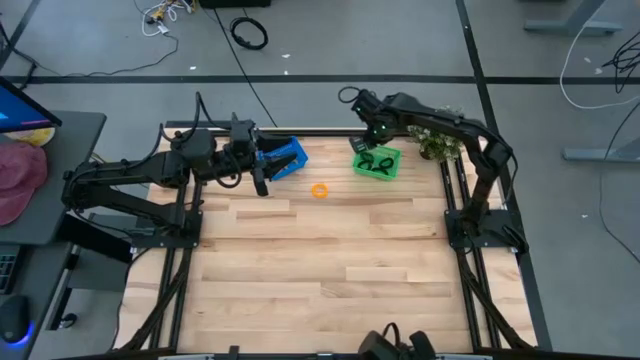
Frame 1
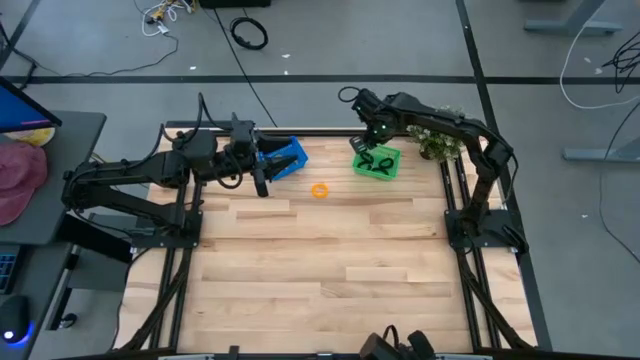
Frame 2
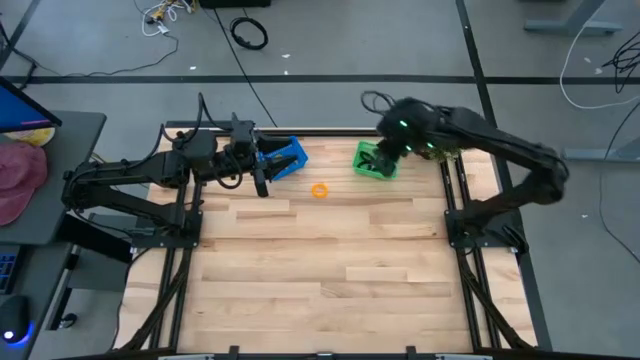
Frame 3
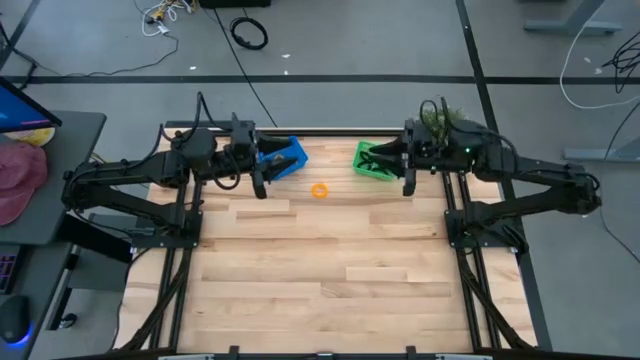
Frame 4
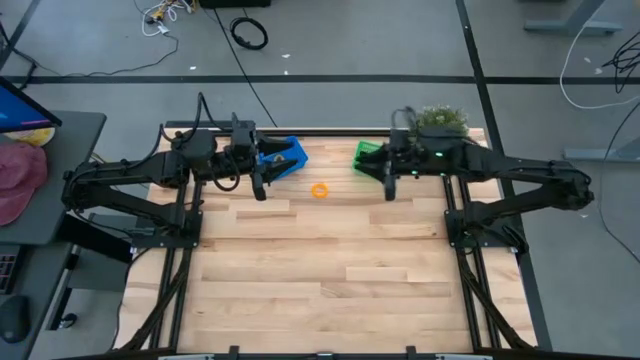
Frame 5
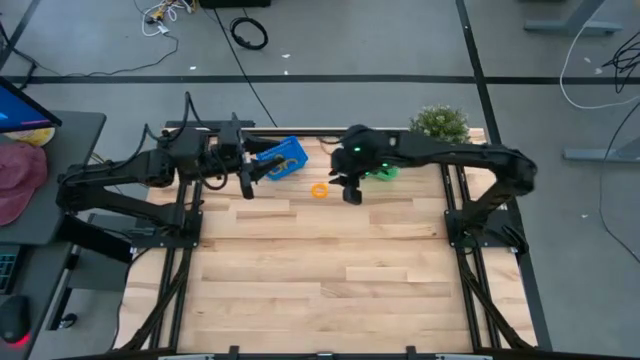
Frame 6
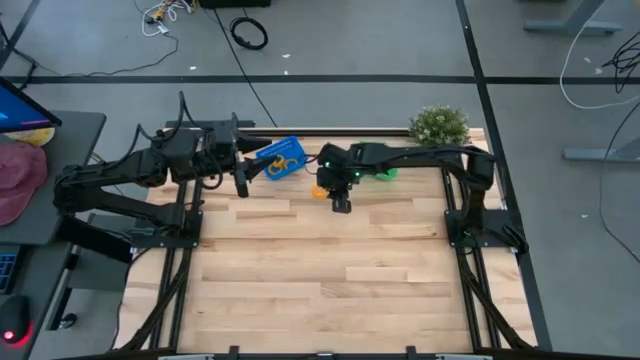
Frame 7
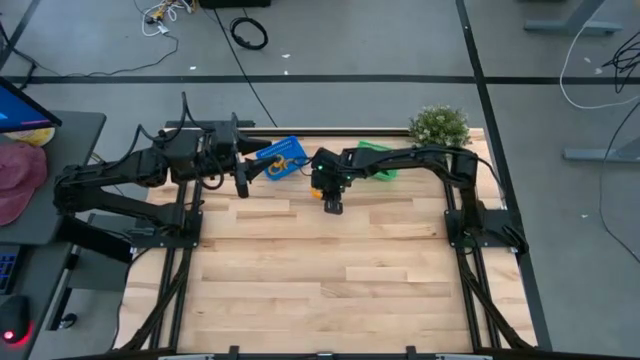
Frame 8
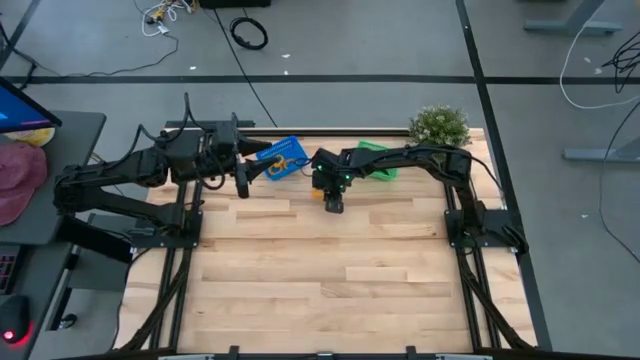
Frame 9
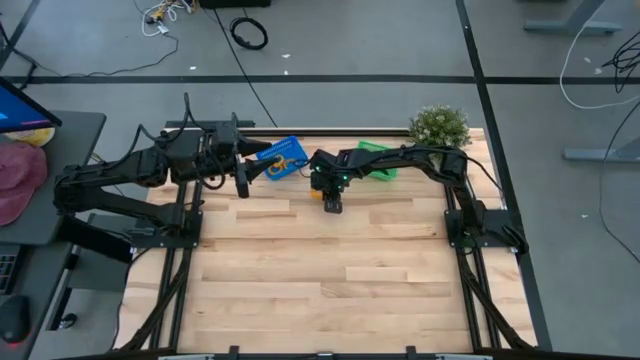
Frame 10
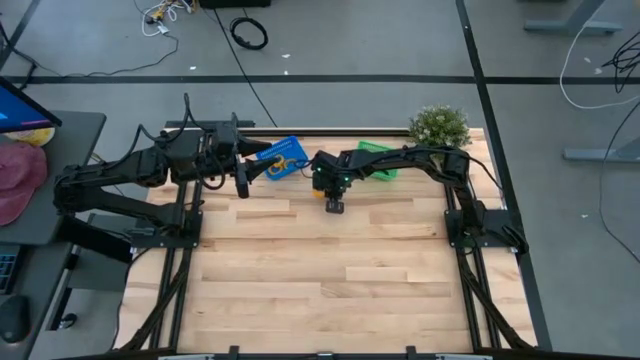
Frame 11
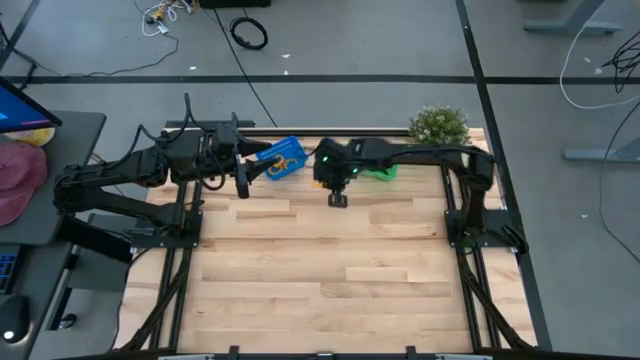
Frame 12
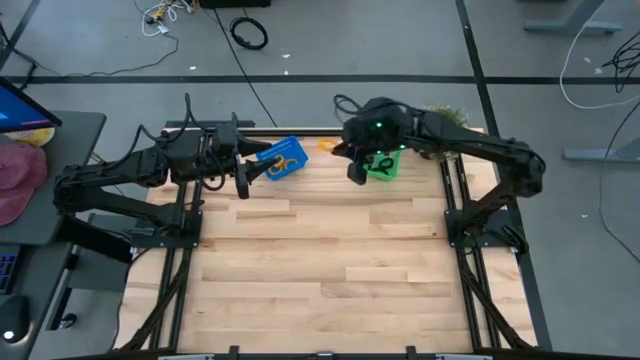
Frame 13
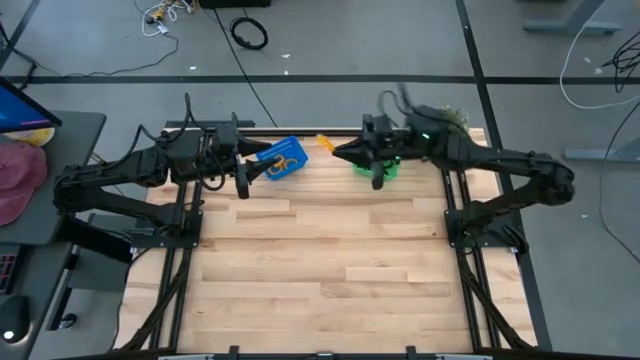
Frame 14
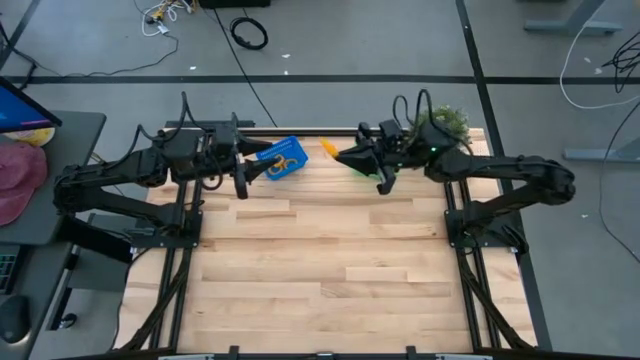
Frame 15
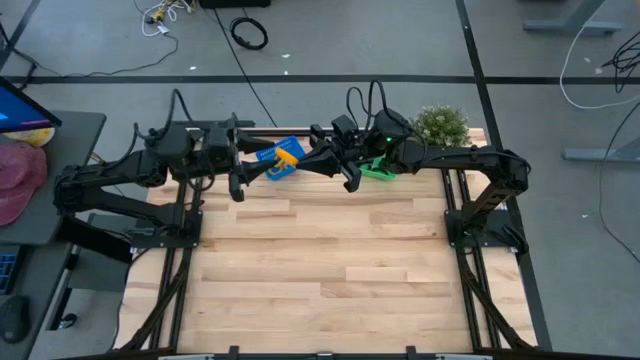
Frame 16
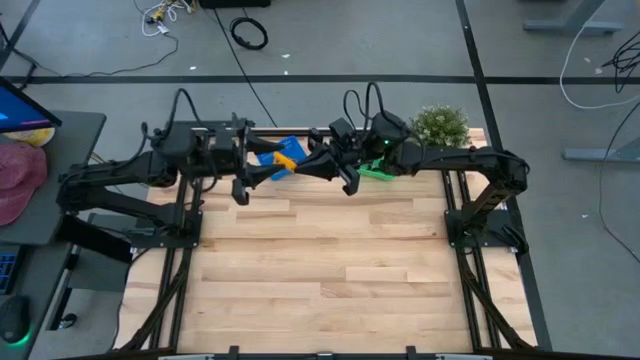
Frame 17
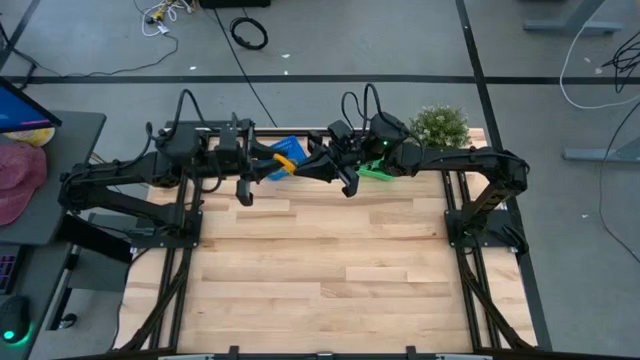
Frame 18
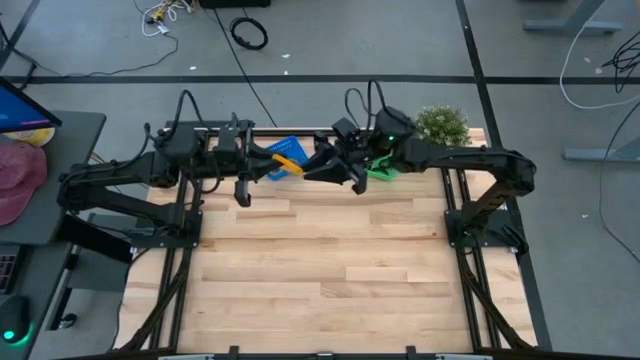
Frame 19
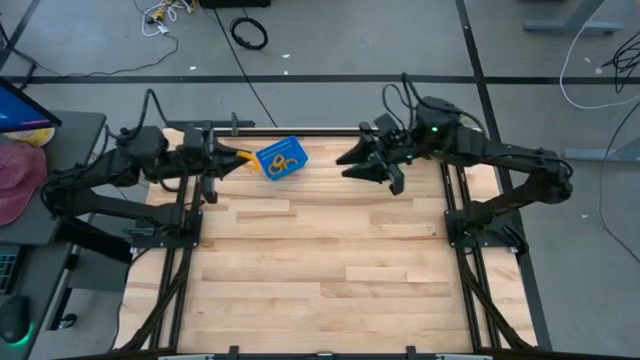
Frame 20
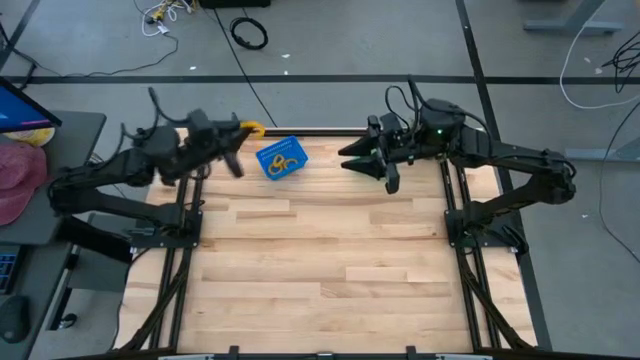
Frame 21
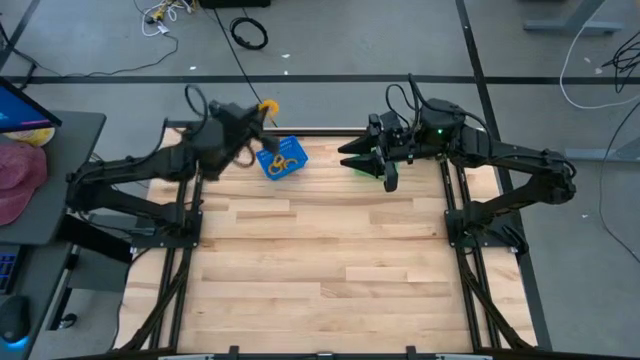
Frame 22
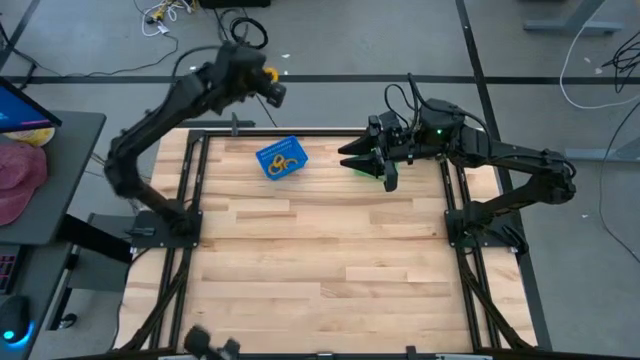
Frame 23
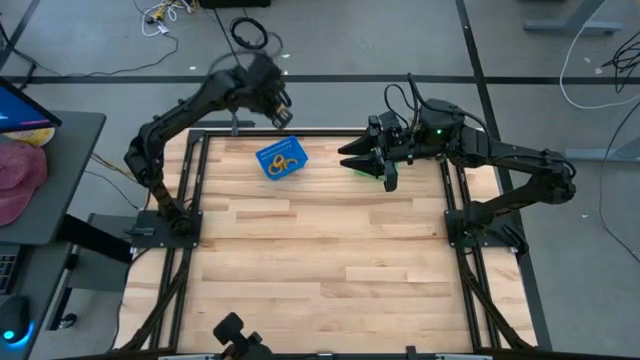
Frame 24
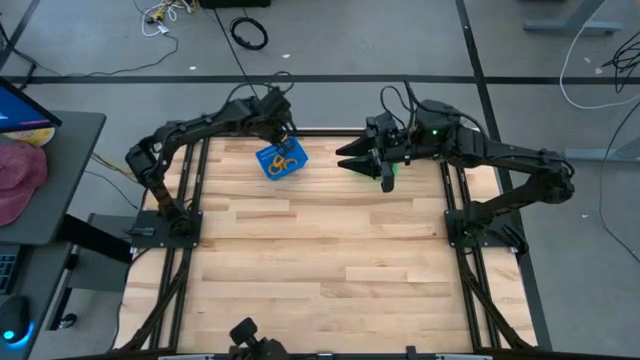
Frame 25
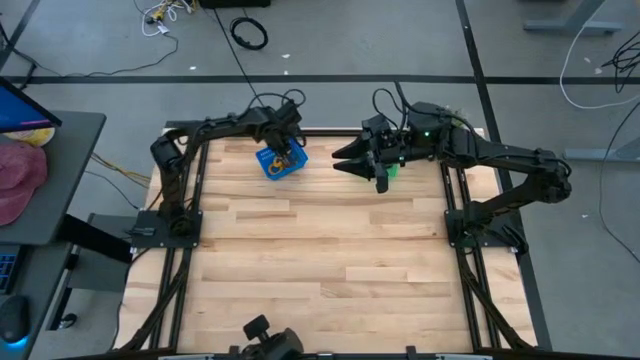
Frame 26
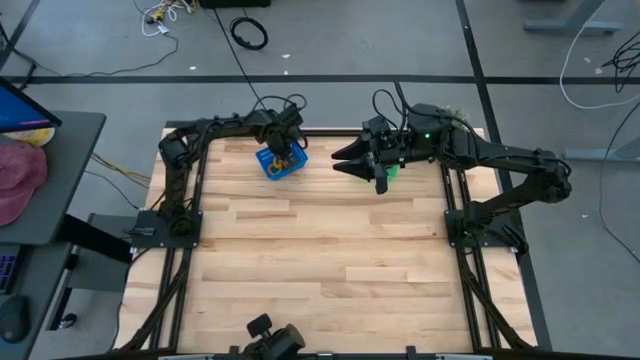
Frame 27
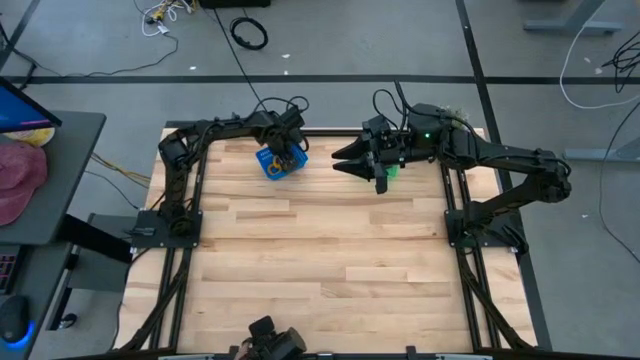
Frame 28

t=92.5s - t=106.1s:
Task: Sort spring keychains
Put the yellow spring keychain into the blue bin

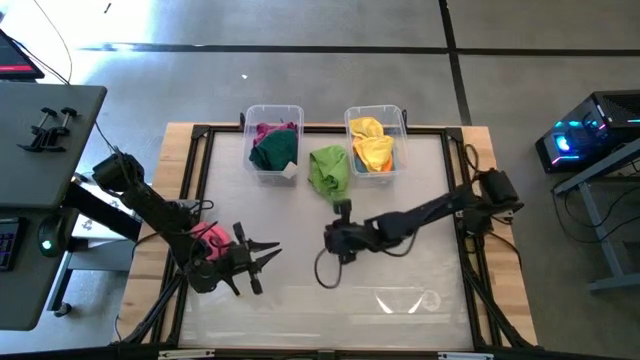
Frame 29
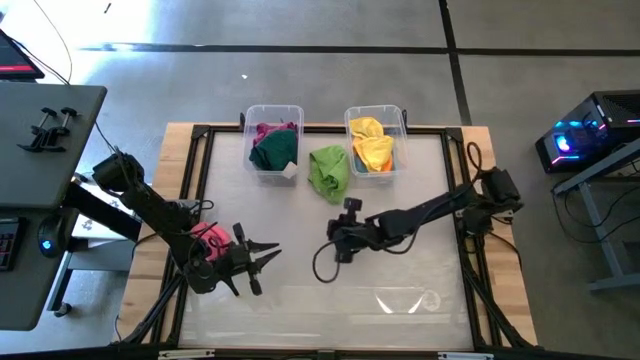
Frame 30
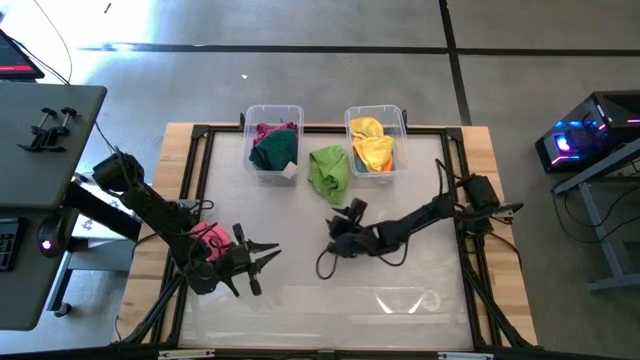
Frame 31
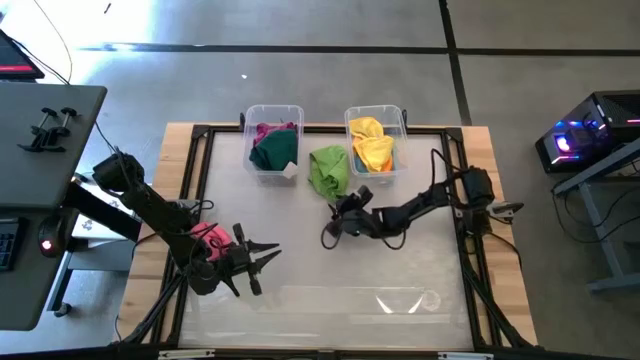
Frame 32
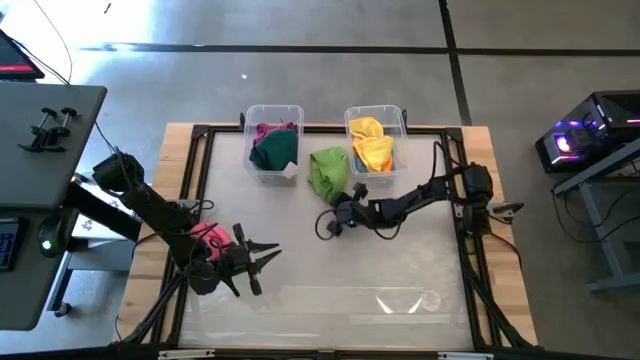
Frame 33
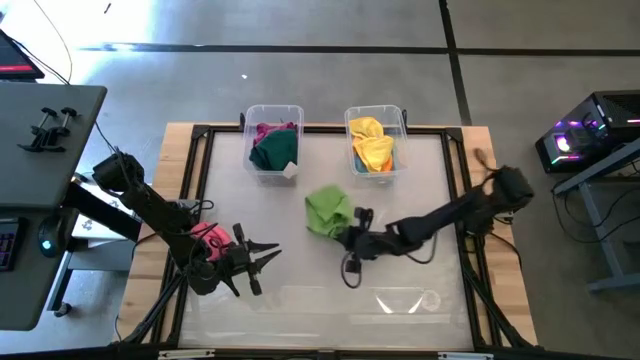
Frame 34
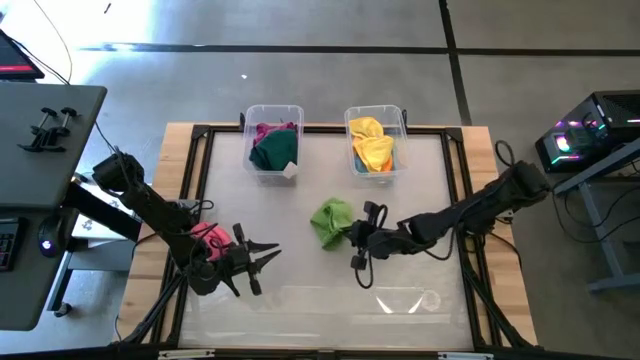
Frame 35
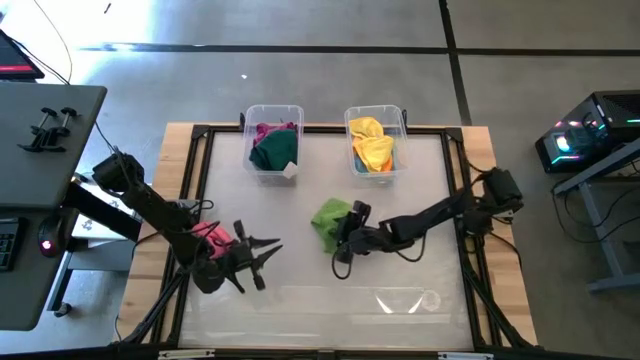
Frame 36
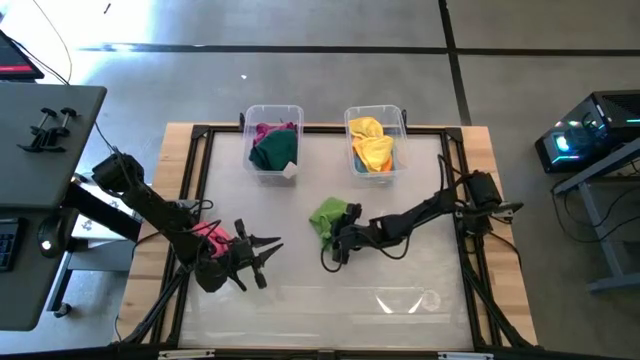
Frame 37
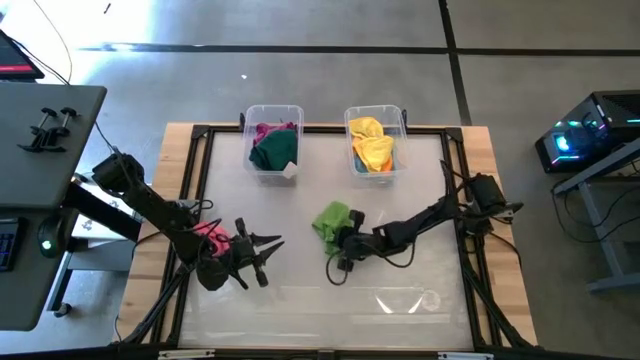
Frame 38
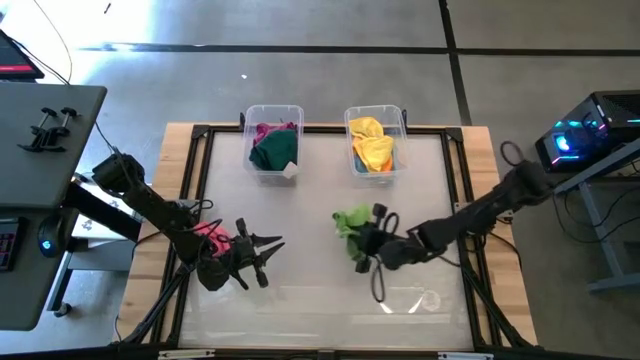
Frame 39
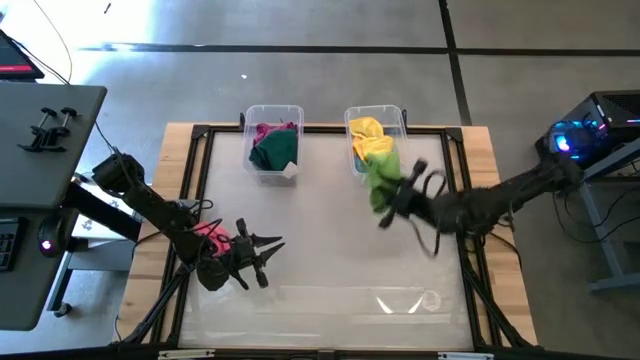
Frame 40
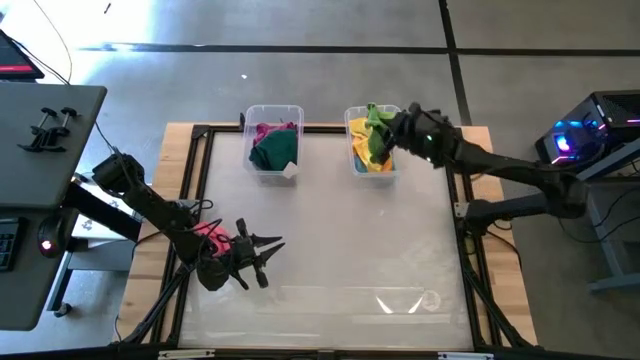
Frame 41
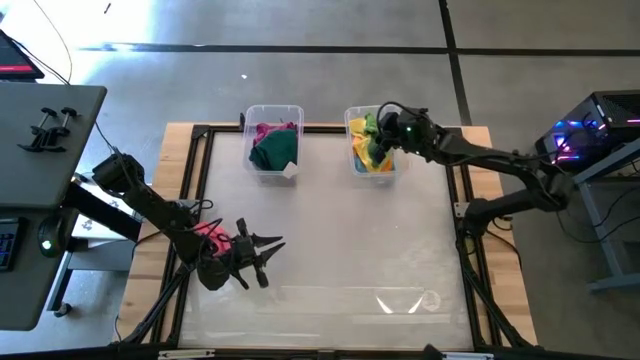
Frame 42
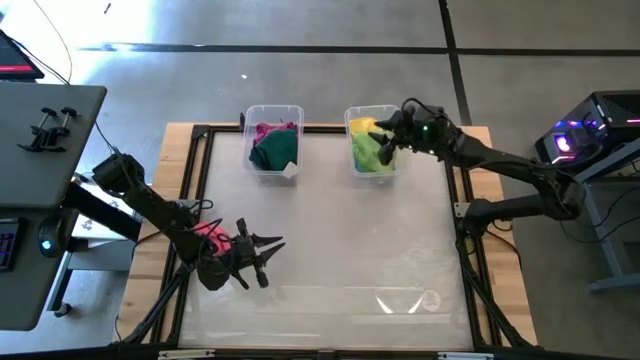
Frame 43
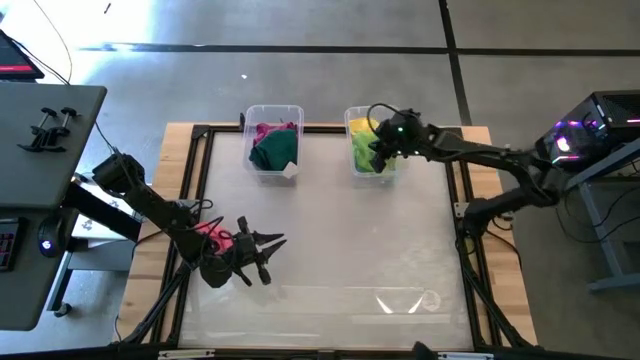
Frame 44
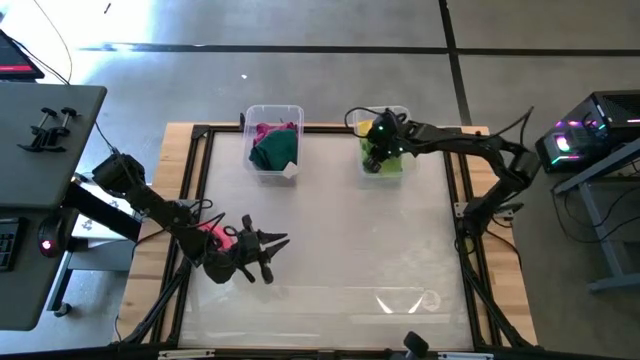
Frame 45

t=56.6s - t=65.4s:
Task: Sort towels by color in basket
Put the green microfiber cloth into the right transparent bin
